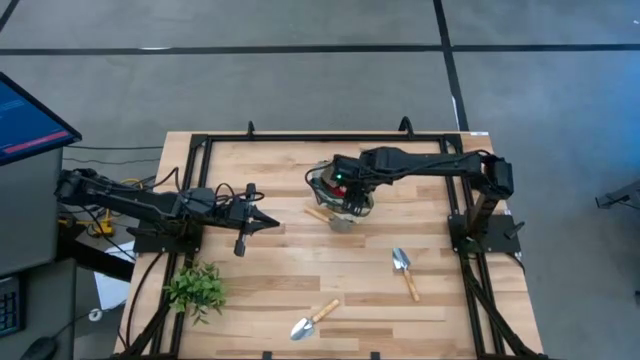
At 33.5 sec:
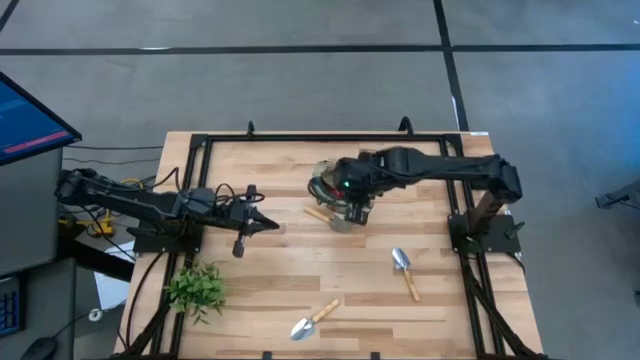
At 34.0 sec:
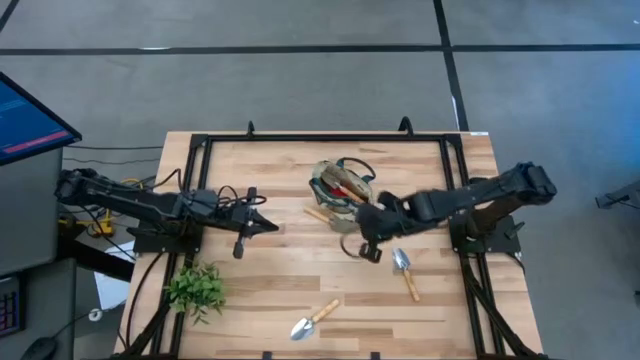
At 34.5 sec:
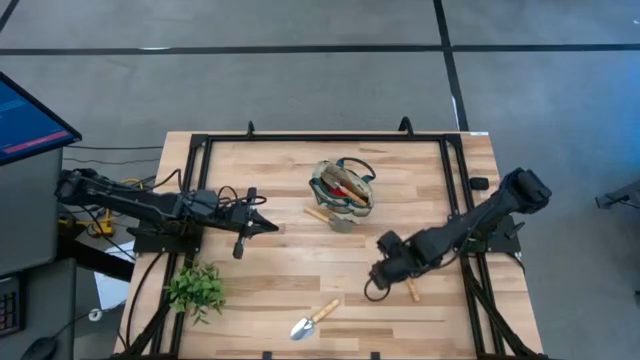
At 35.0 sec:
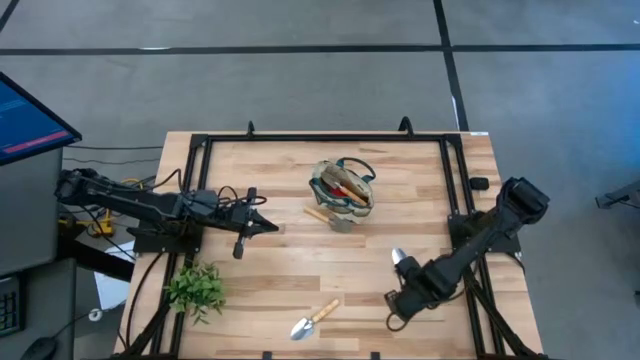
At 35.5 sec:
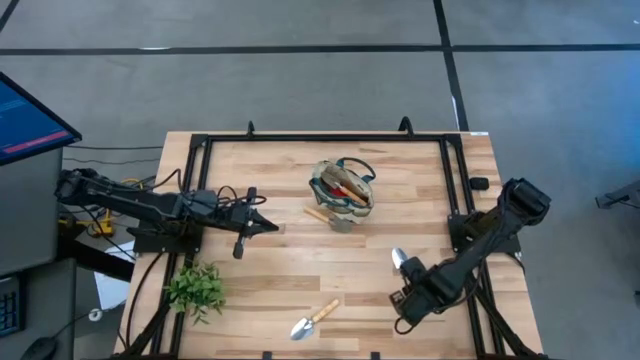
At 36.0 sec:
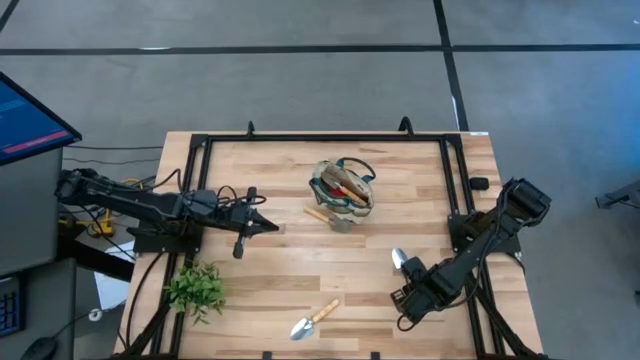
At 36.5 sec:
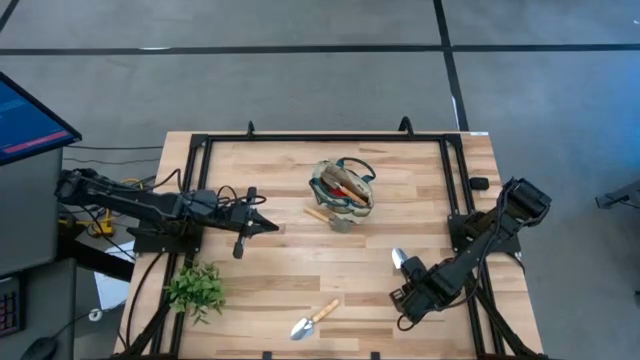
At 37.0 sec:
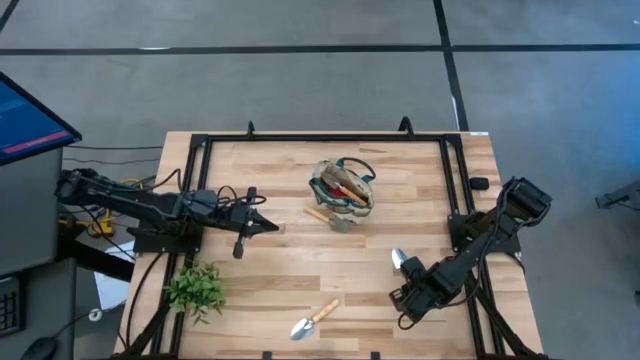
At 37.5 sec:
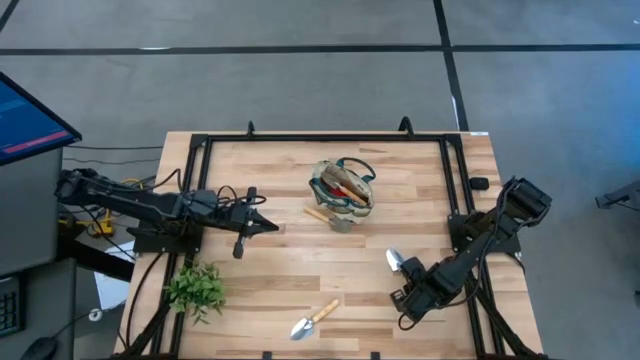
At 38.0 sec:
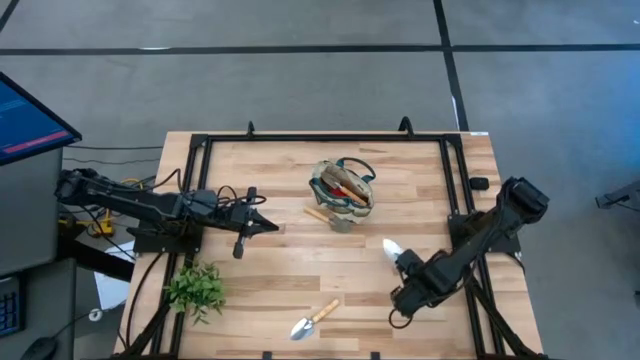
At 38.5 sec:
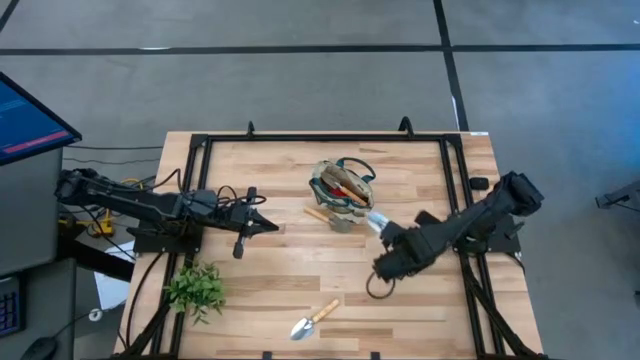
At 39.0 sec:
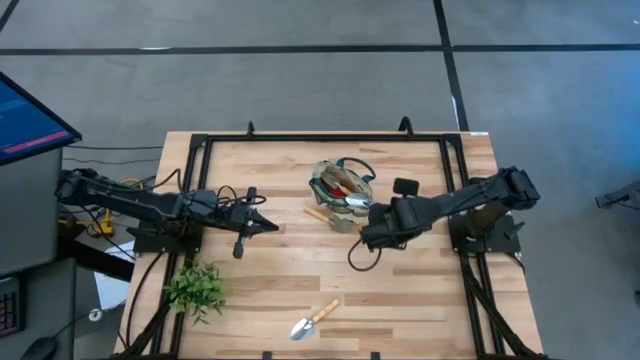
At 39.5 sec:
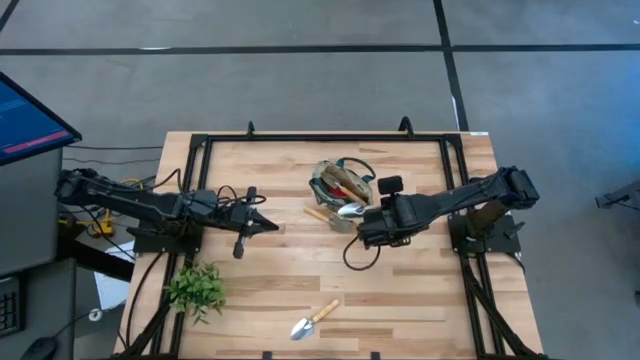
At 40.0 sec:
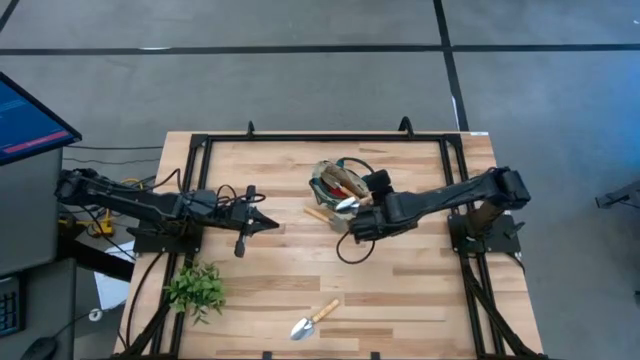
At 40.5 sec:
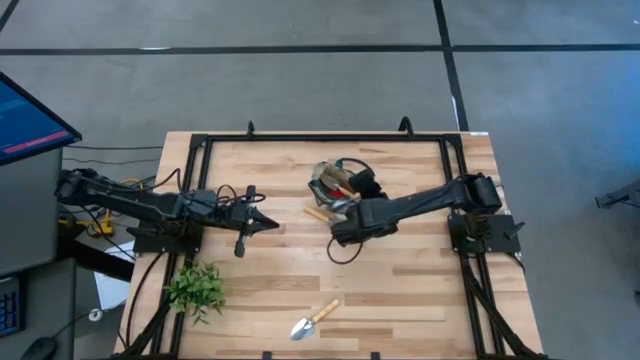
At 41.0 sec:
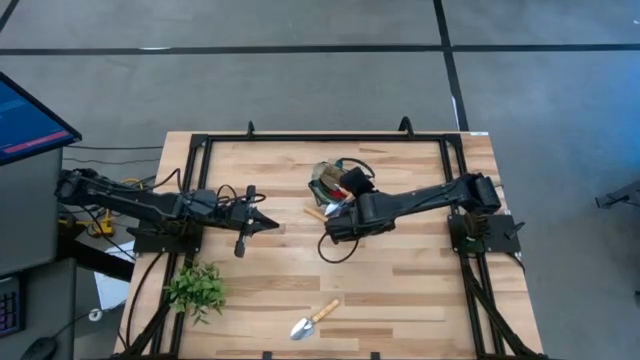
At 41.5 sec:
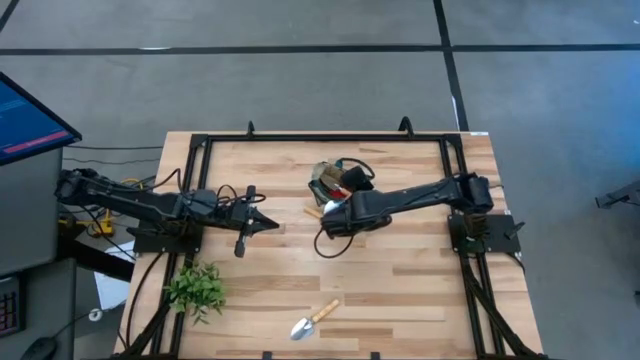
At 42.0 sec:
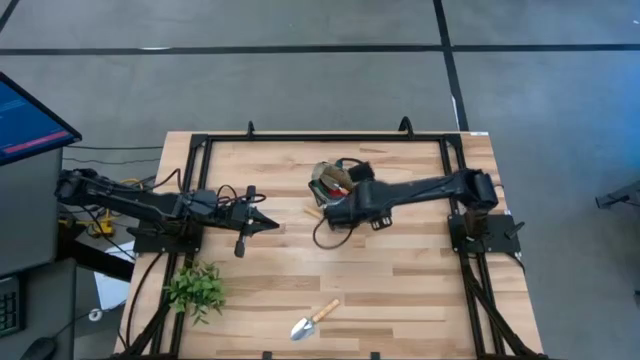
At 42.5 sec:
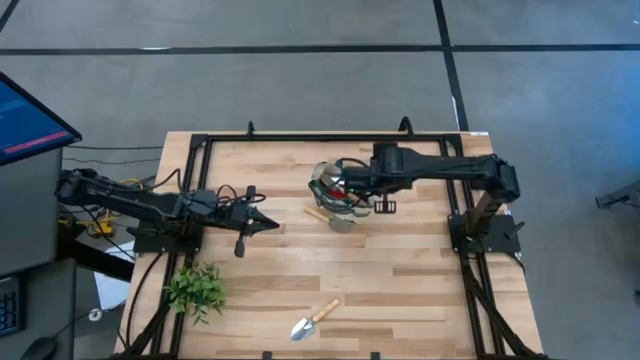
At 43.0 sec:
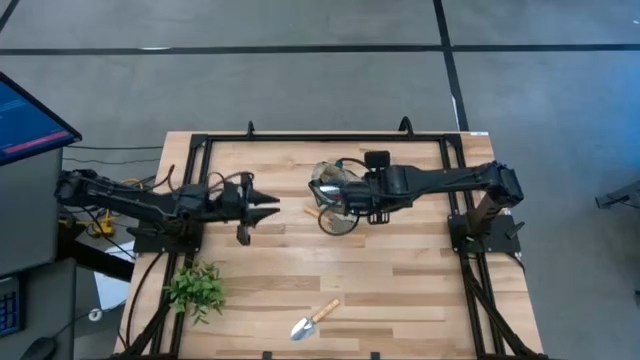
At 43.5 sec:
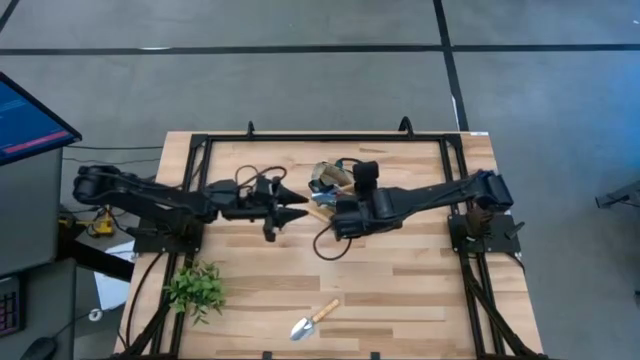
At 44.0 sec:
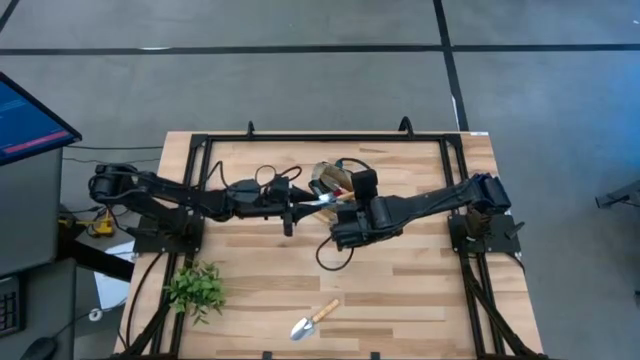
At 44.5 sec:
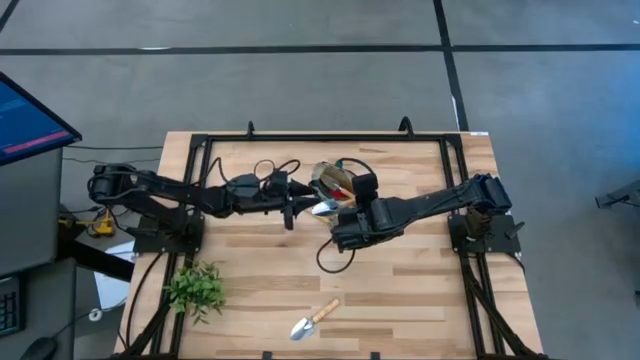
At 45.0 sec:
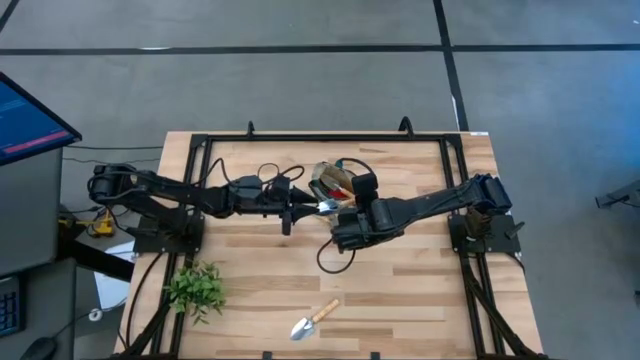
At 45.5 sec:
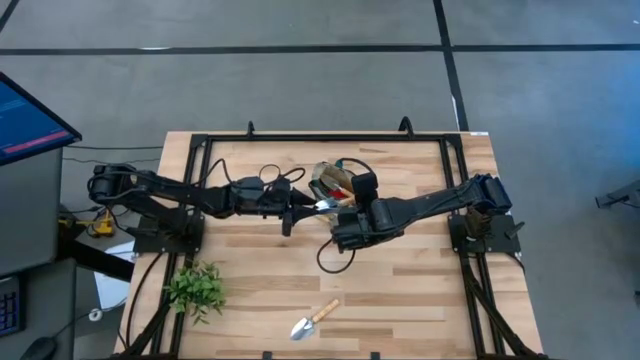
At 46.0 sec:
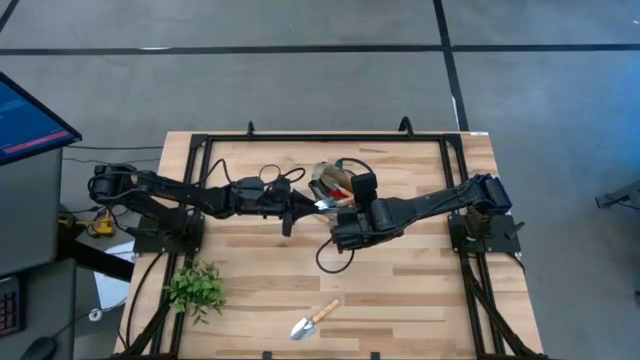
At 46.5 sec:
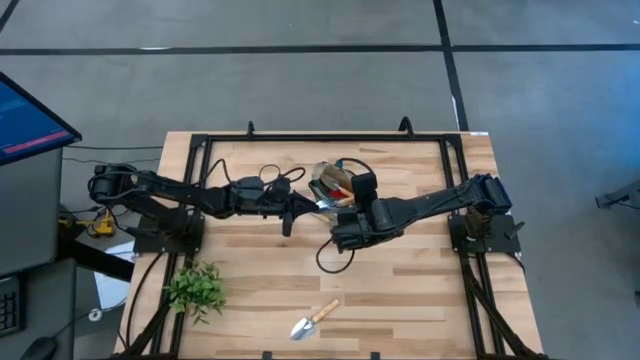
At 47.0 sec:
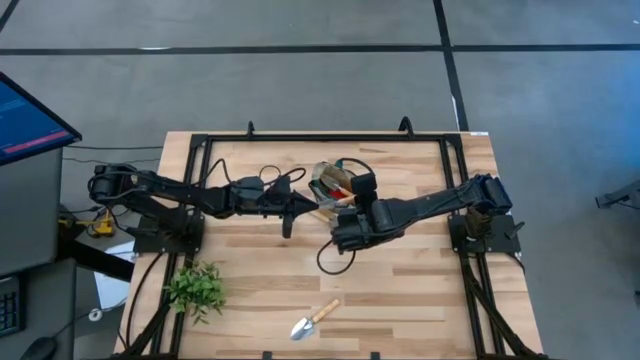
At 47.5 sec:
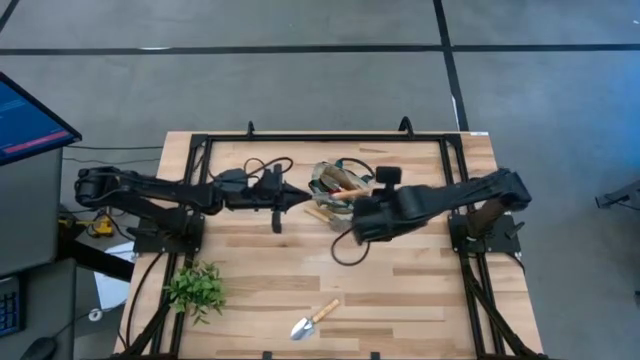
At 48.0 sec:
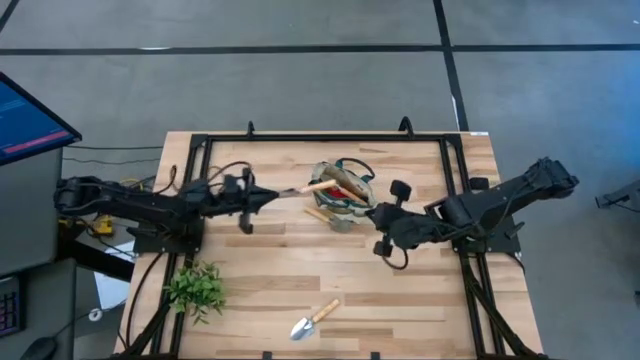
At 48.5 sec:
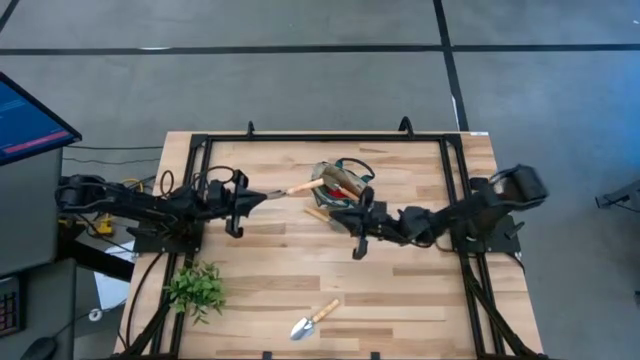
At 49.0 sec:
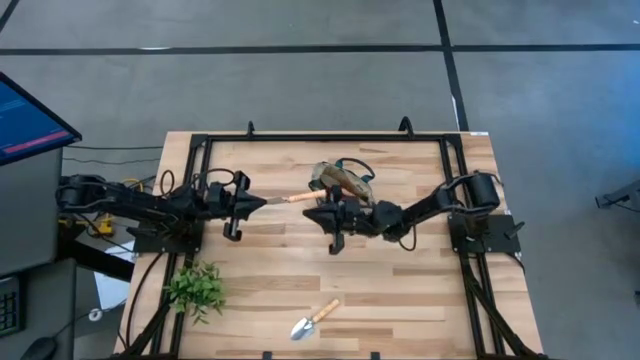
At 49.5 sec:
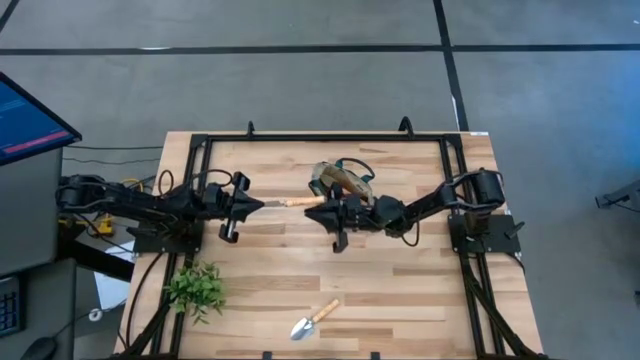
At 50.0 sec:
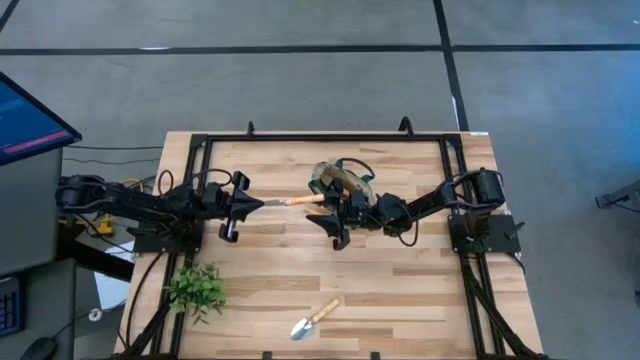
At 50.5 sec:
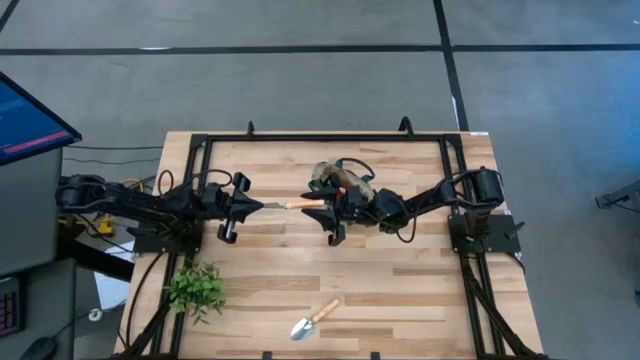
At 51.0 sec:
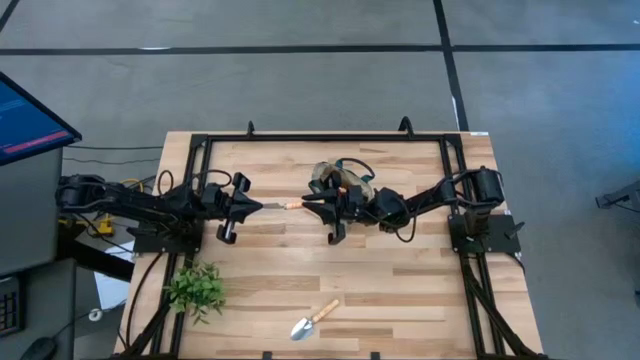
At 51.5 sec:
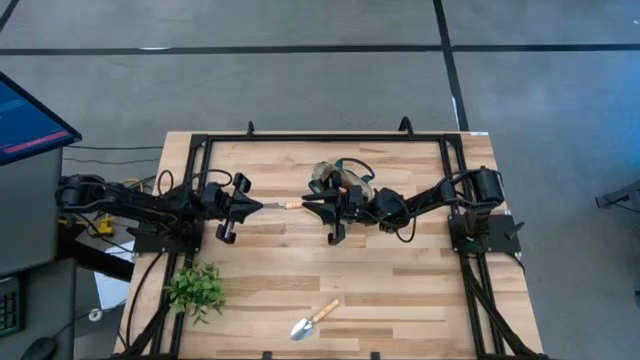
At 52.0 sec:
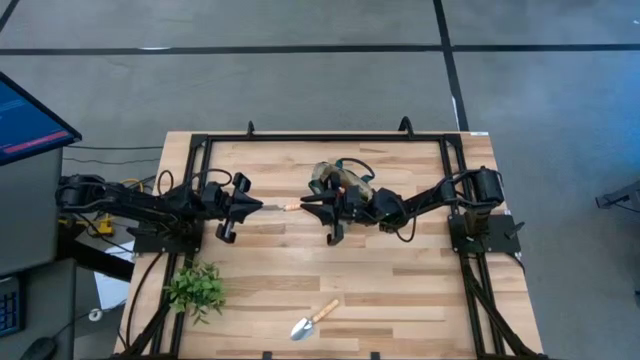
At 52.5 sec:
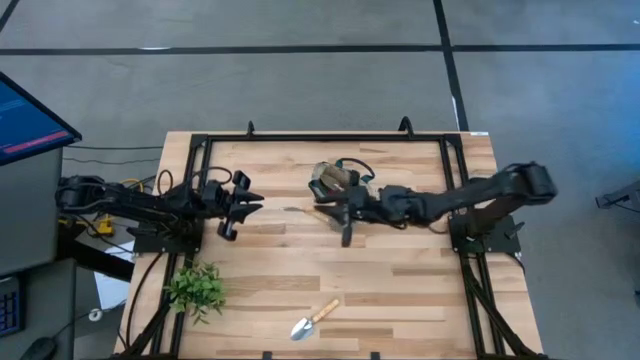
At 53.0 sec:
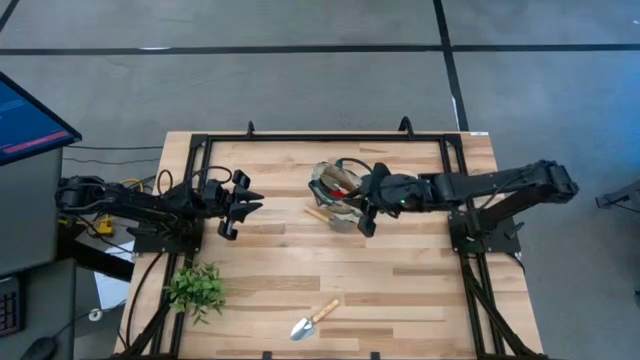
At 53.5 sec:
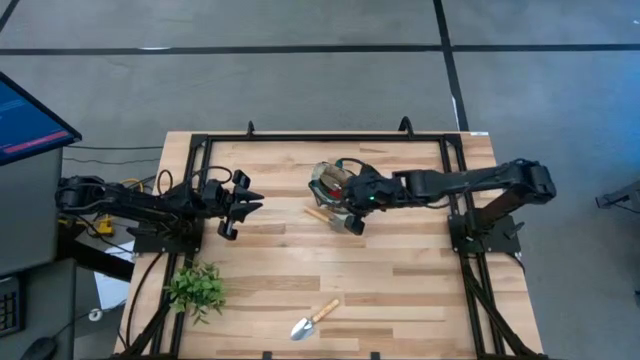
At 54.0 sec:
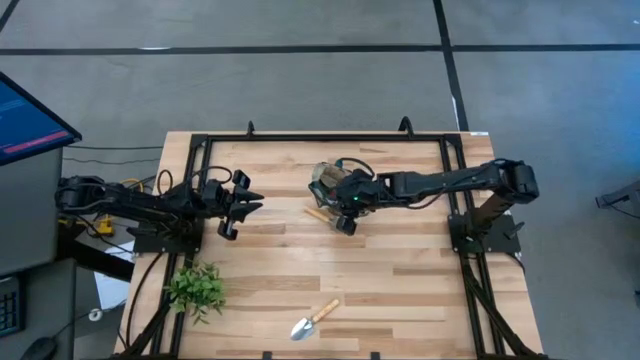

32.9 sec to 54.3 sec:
Task: Pick & Place Garden tools in Gardening bag
Put the brown trowel into the gardening bag
